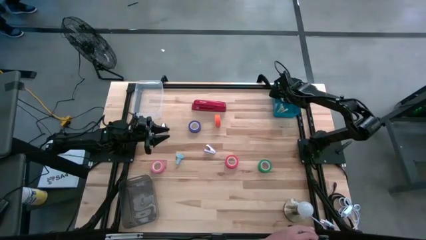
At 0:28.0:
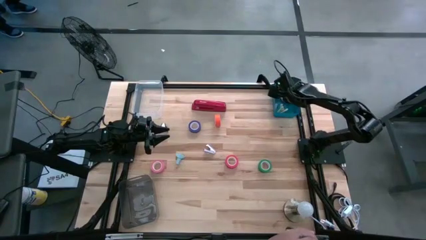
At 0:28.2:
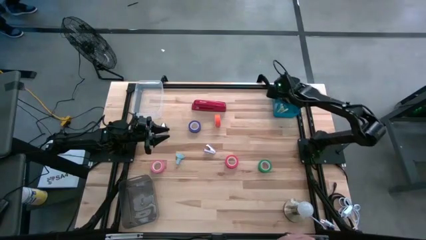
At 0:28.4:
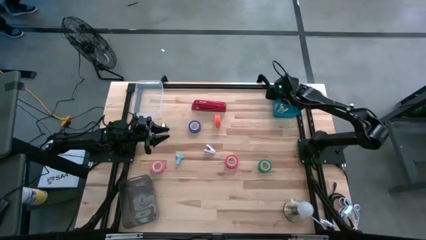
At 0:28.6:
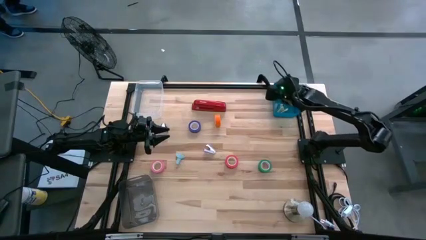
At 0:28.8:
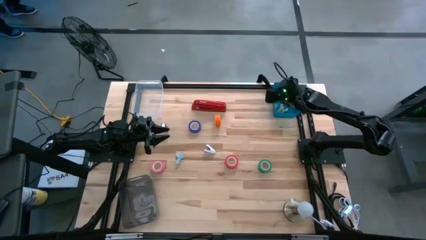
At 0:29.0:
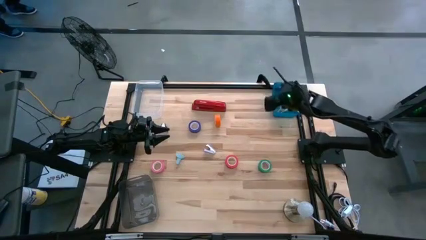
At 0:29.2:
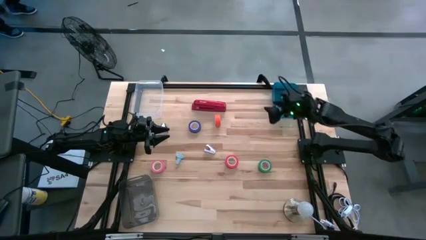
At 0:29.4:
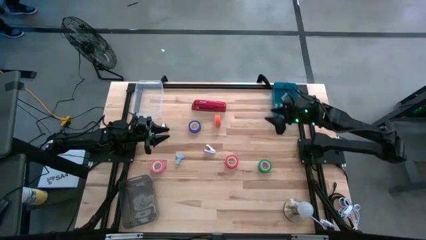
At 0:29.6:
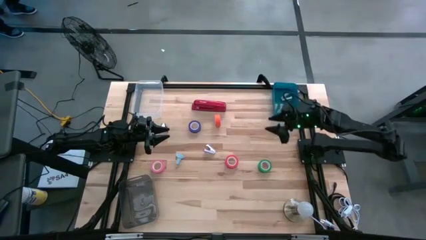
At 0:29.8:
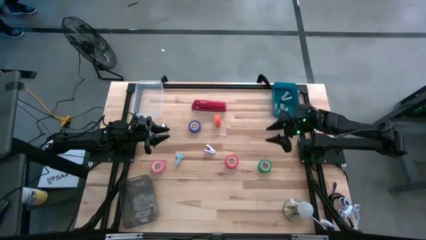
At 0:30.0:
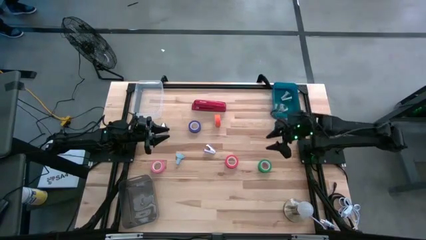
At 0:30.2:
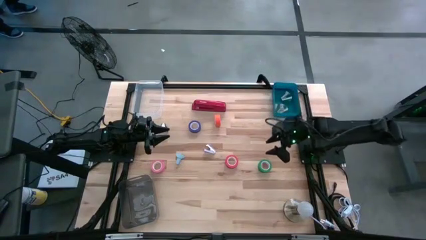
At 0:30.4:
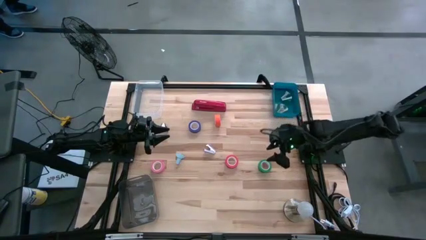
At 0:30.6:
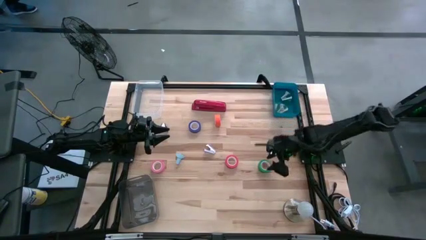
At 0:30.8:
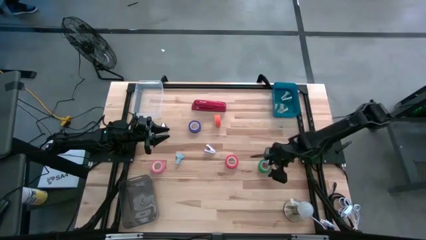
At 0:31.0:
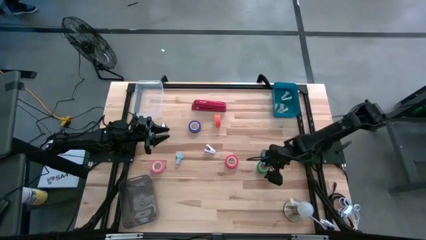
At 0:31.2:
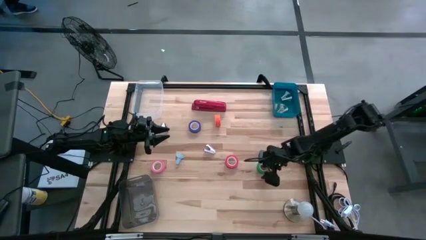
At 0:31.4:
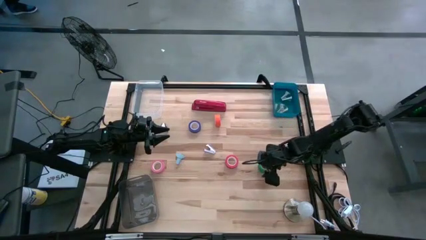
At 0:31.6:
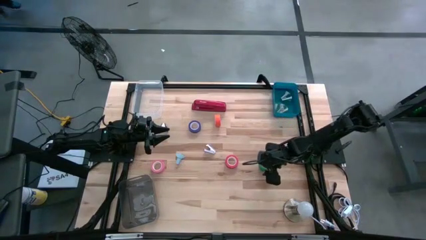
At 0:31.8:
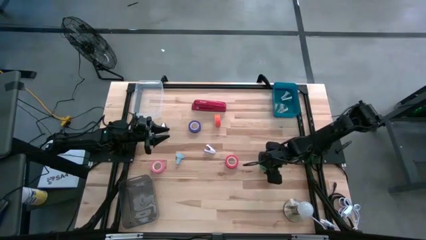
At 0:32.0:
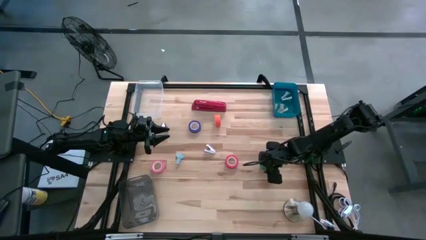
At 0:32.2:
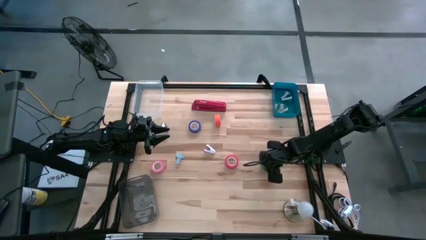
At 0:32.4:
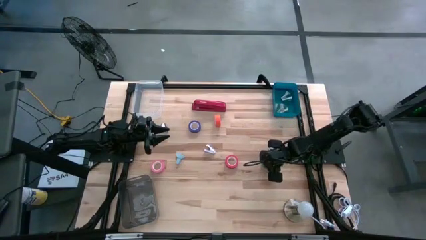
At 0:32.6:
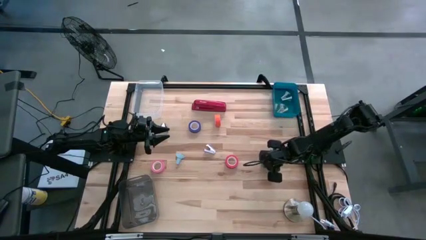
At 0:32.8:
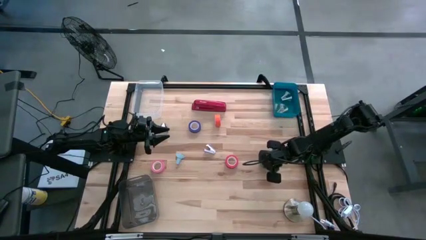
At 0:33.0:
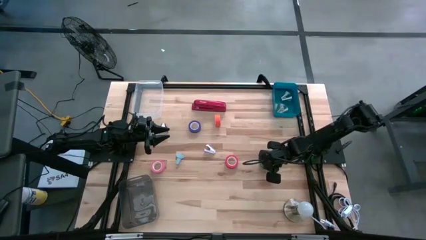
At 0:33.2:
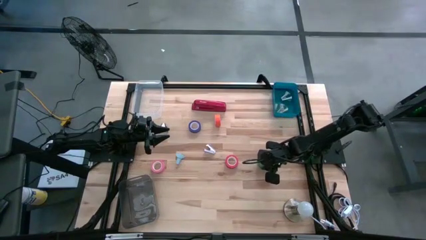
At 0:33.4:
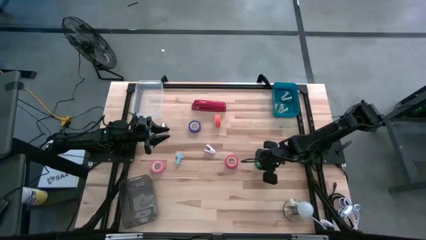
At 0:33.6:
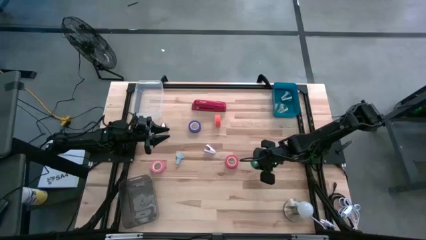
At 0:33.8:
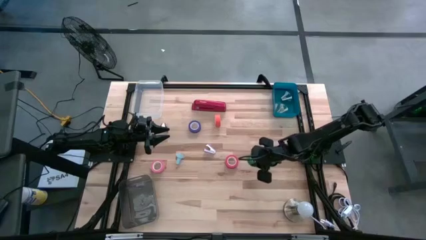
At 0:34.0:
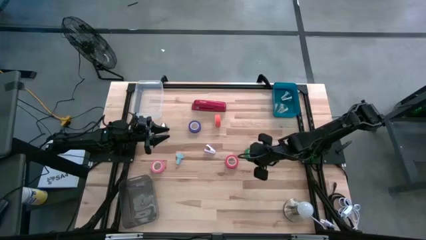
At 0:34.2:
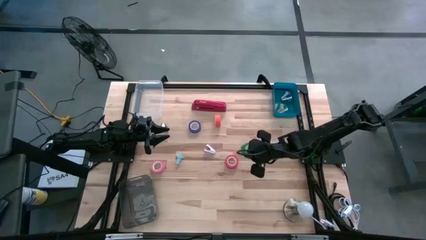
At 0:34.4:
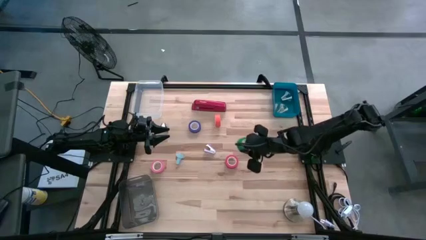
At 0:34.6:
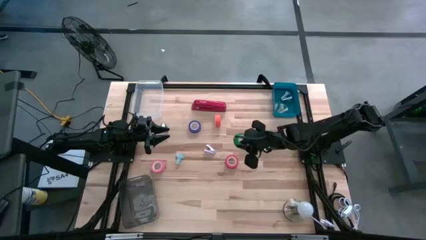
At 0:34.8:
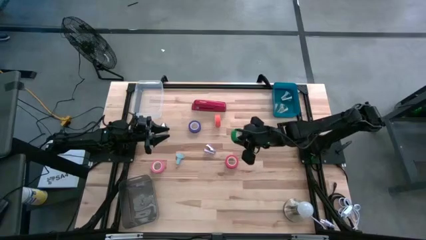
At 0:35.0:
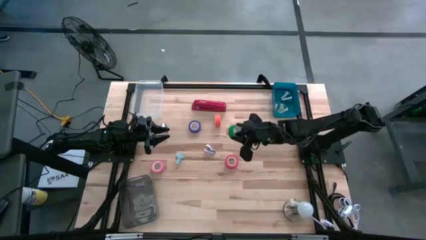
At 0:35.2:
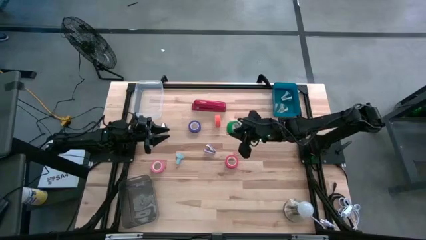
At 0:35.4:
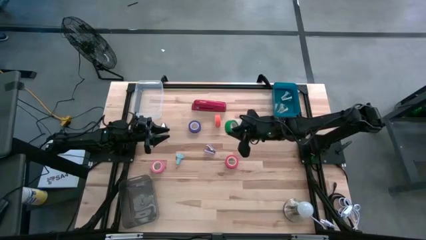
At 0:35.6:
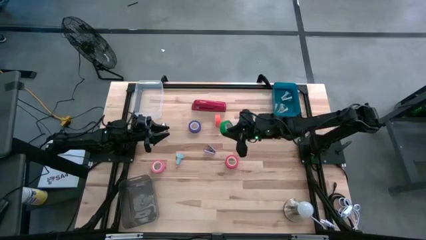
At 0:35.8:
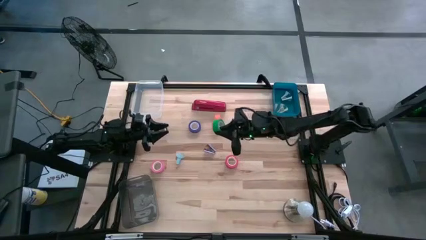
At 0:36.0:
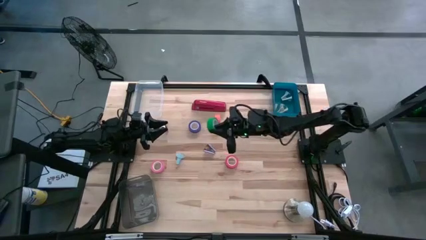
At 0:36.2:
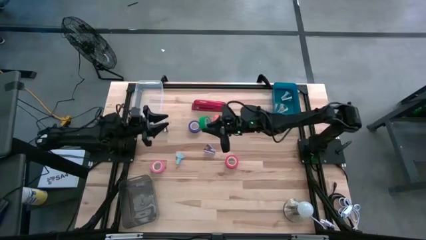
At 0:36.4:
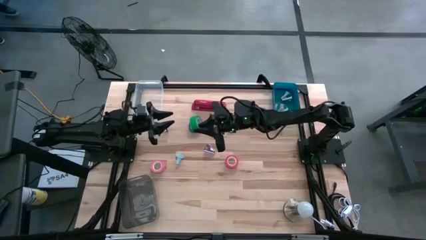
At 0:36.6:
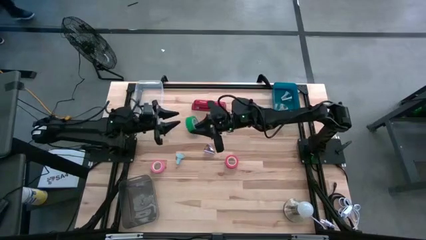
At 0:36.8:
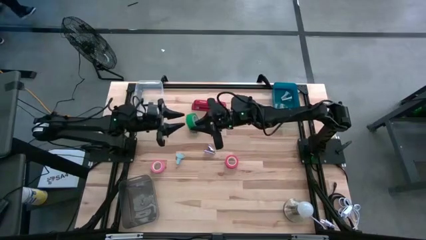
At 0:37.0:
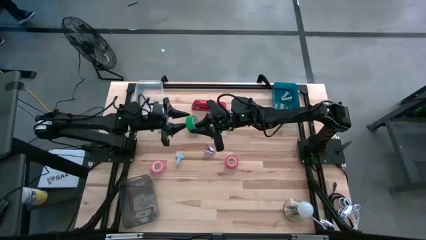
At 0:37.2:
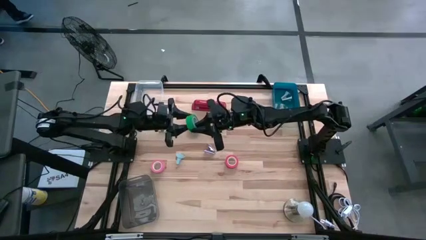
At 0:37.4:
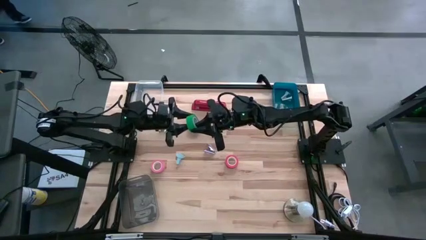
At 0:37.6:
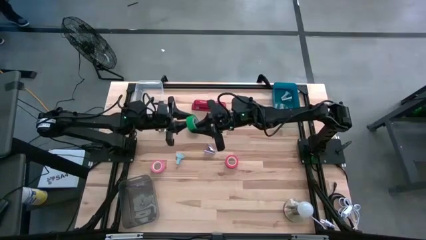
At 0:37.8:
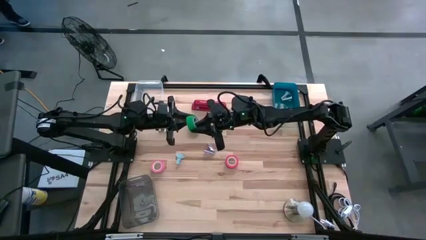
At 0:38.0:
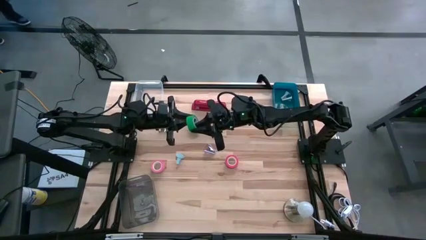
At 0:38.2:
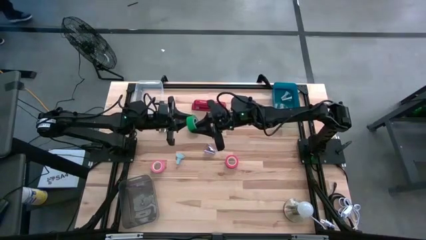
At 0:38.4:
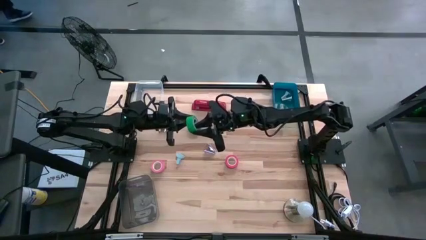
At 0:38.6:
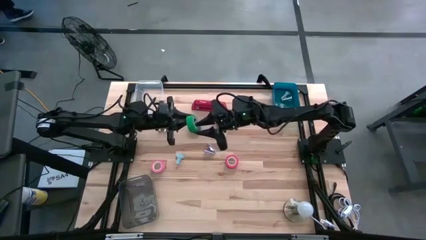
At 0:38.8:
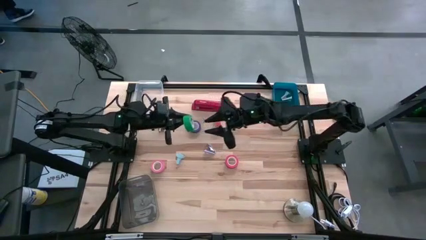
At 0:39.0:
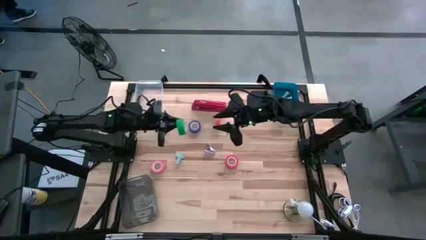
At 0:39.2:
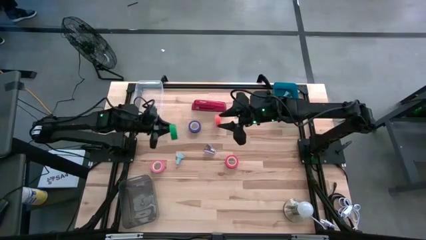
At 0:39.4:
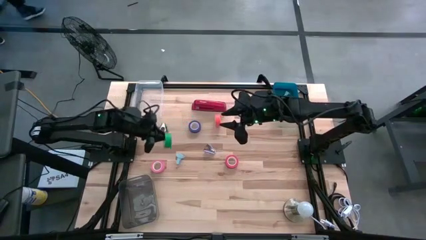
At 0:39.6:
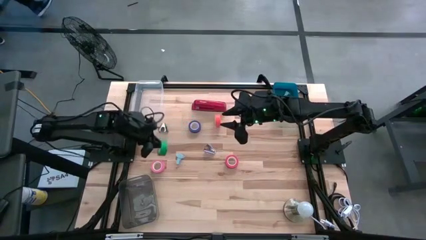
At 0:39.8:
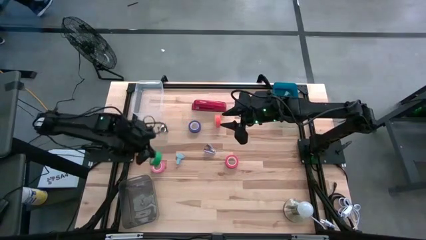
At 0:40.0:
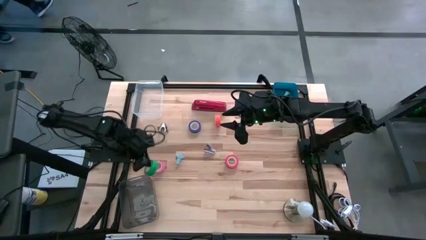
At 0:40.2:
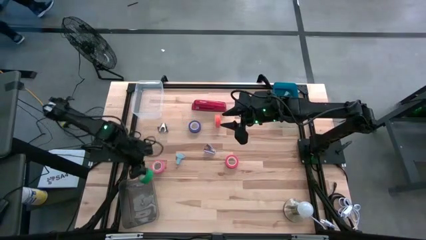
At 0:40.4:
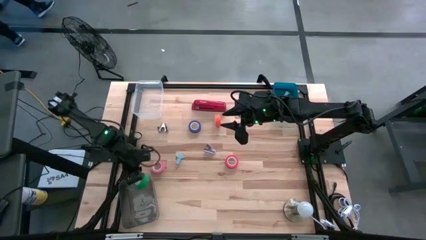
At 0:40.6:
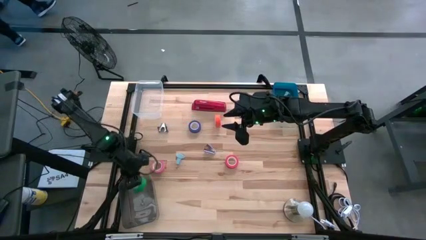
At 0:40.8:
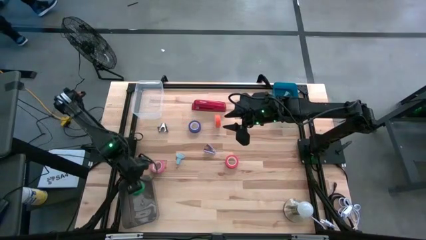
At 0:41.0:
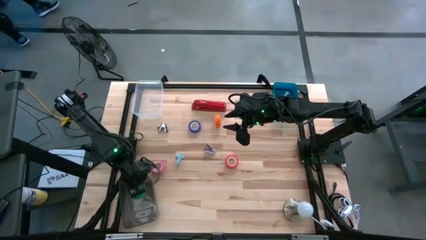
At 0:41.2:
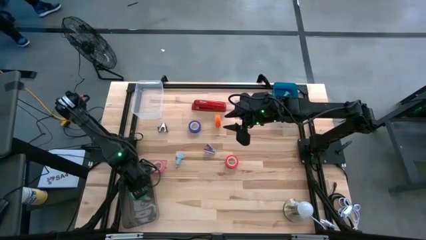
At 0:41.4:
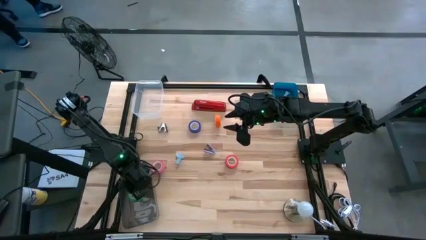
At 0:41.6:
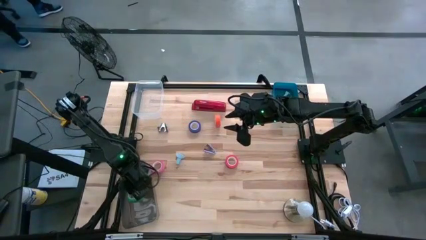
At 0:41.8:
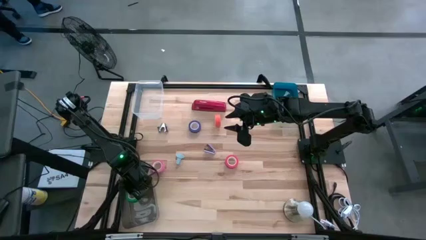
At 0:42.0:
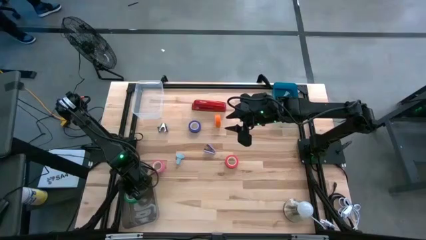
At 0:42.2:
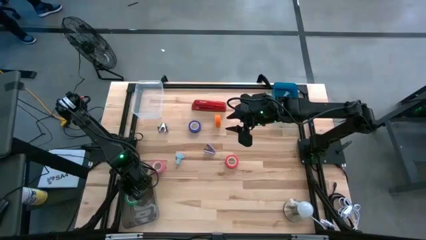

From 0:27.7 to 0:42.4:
Task: Pick and place Stapler, Stapler remover, tape
Put the green tape into the black bin
